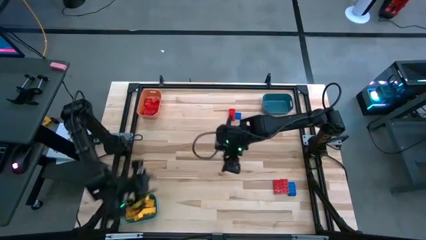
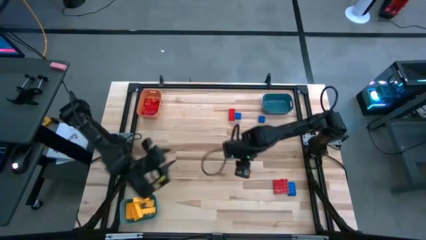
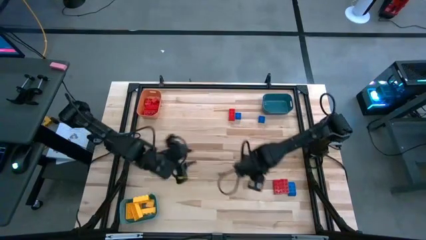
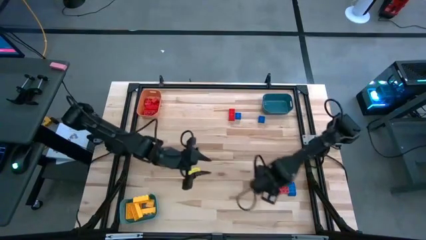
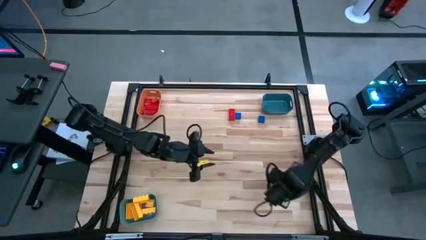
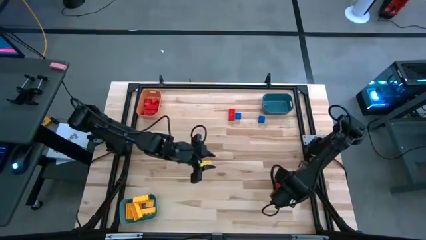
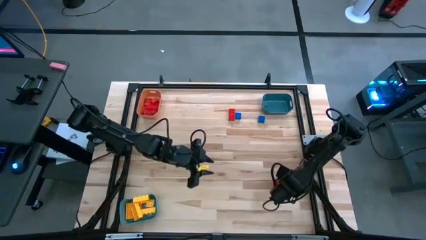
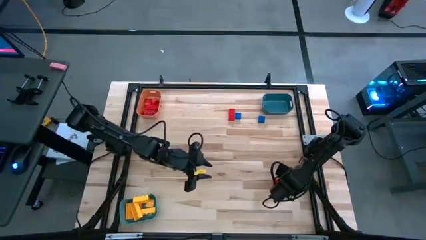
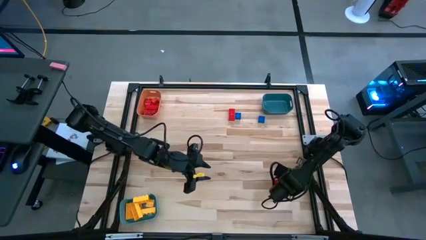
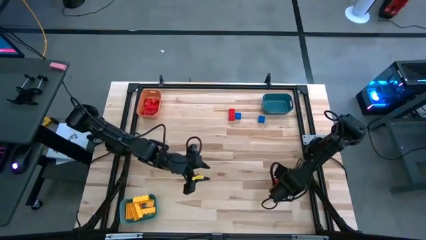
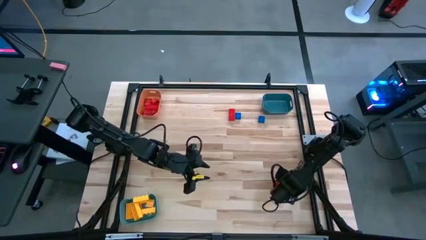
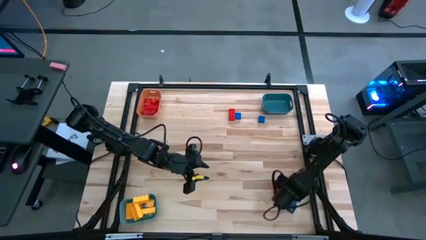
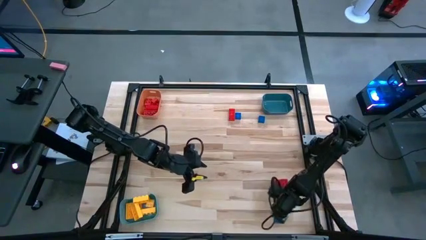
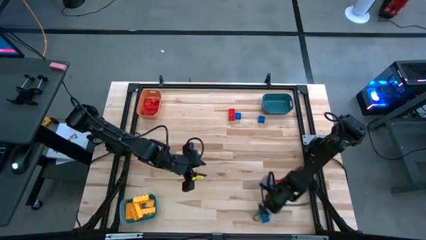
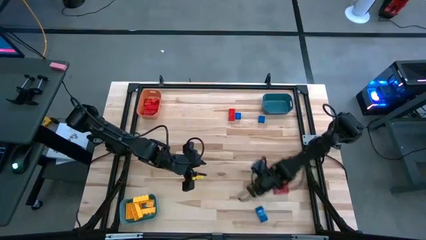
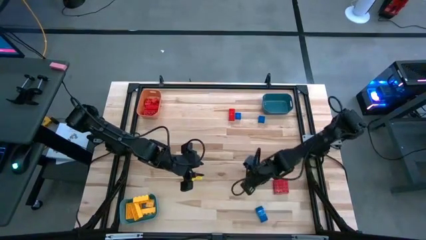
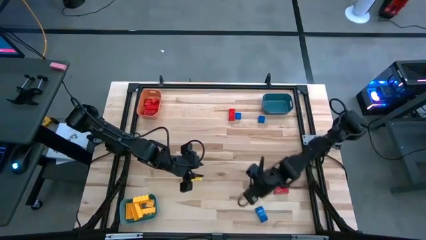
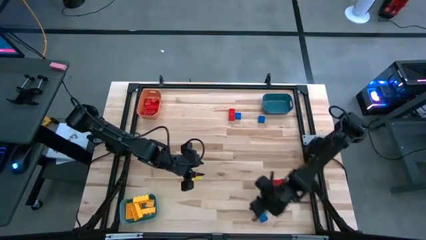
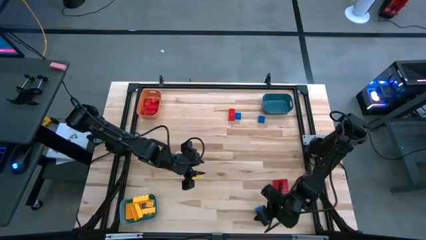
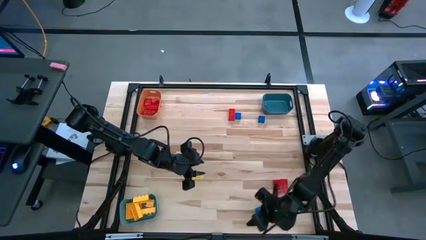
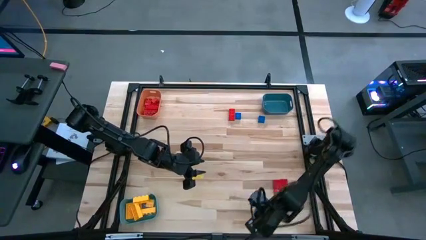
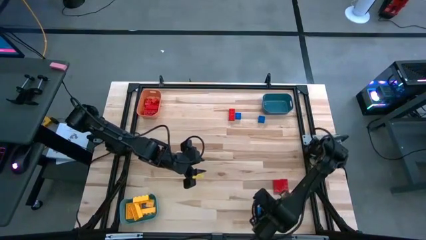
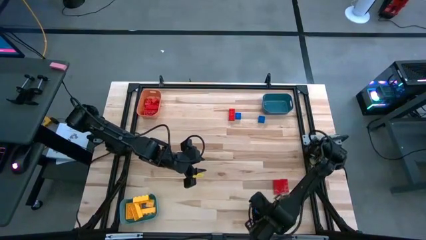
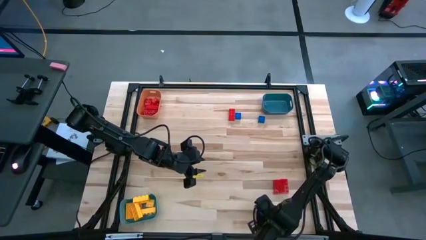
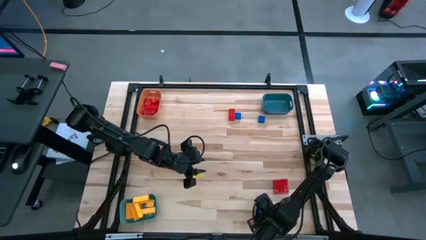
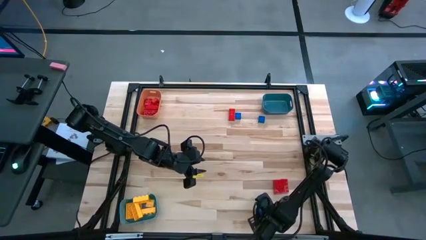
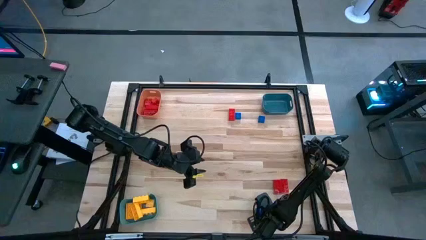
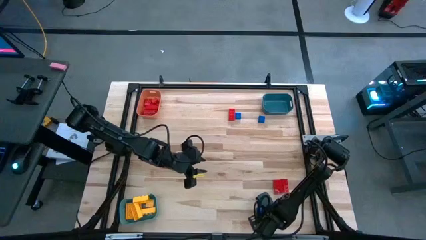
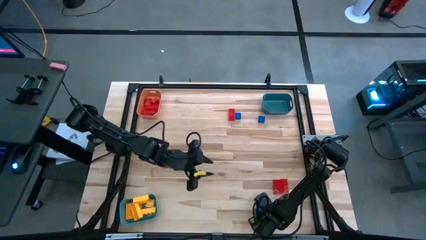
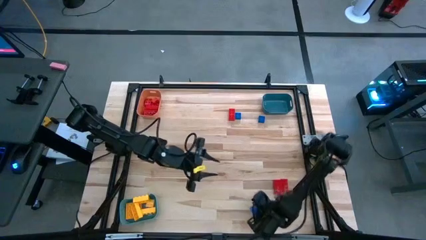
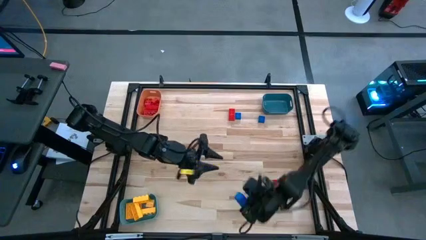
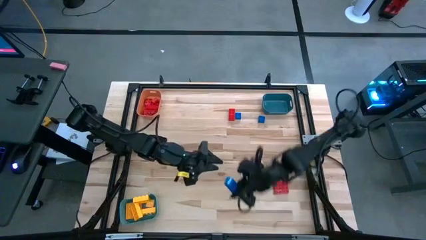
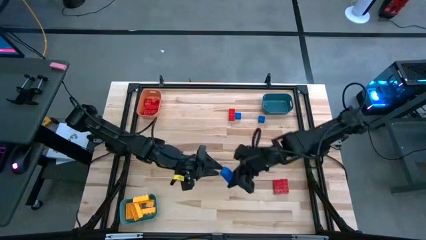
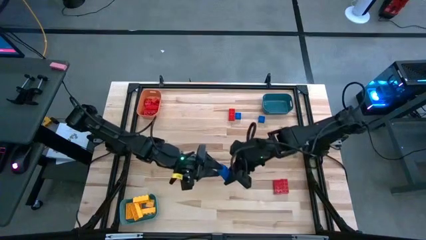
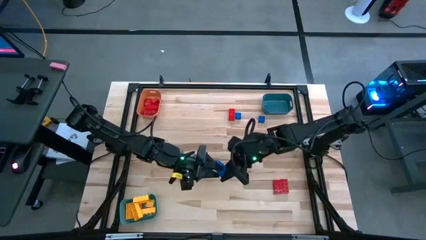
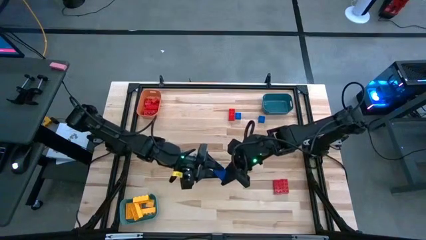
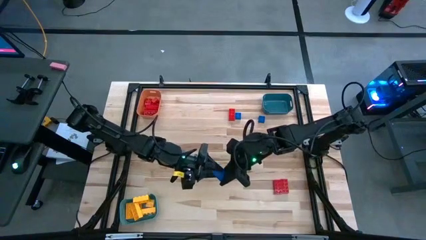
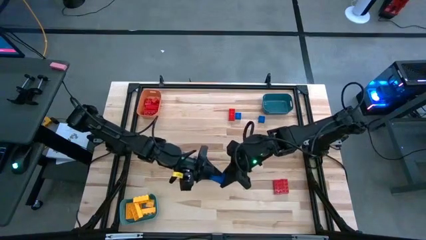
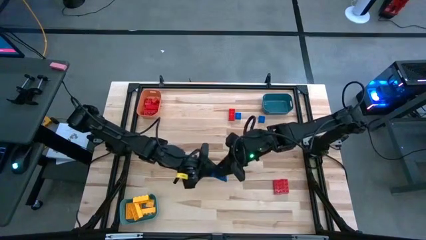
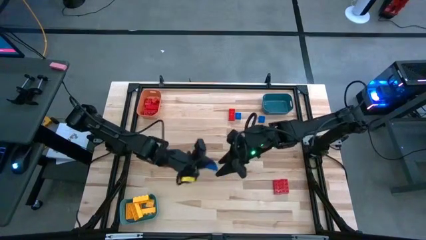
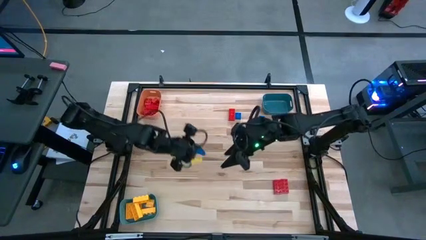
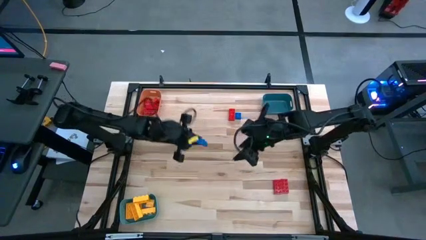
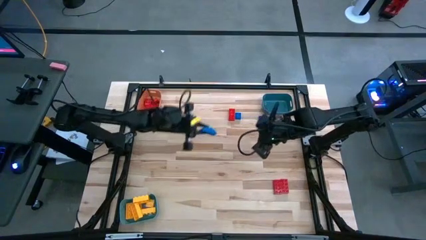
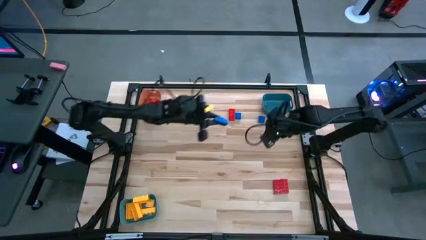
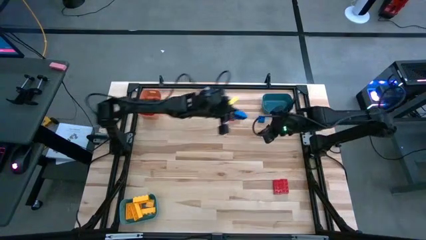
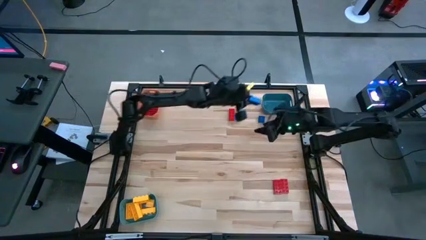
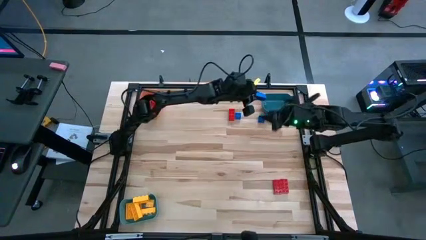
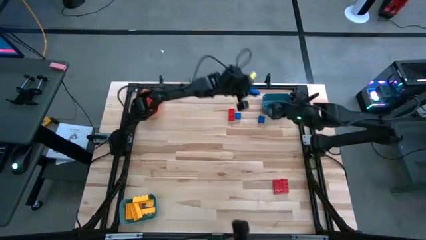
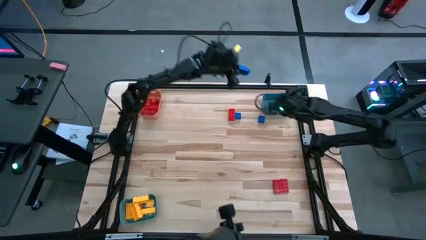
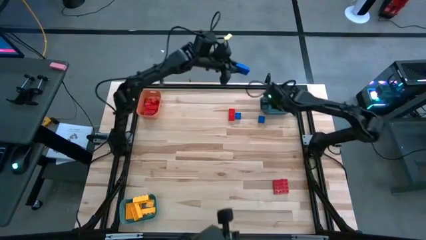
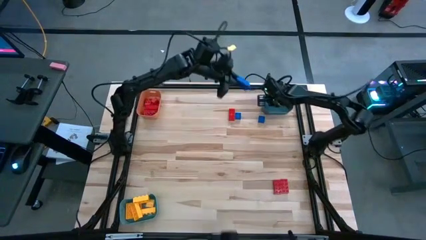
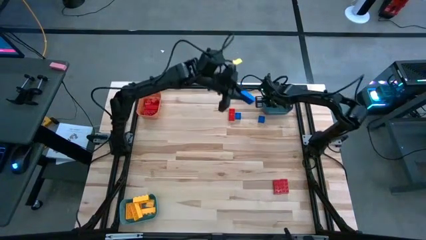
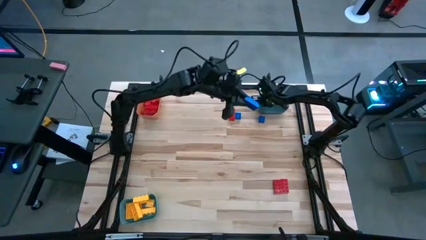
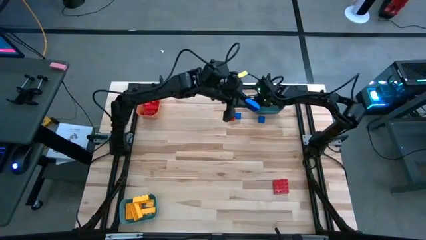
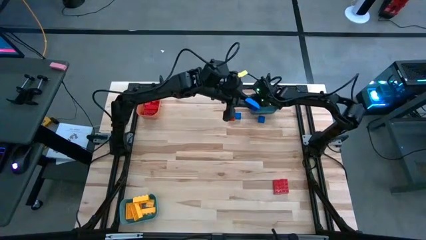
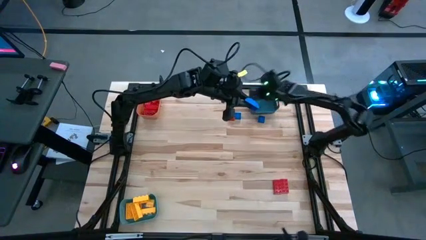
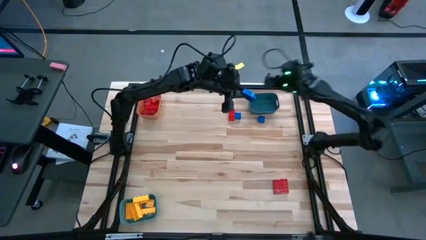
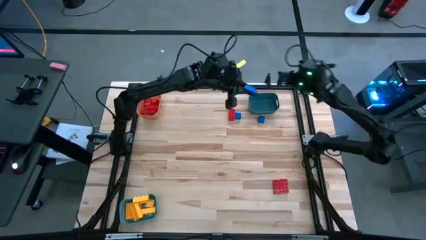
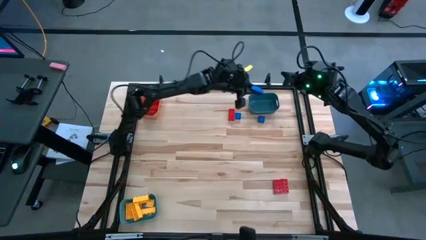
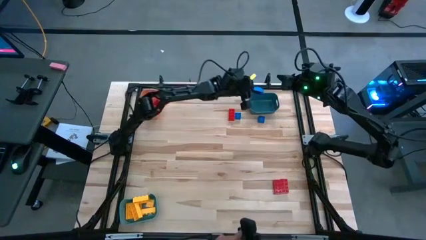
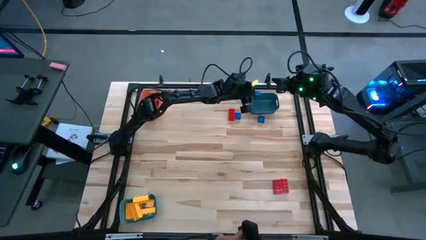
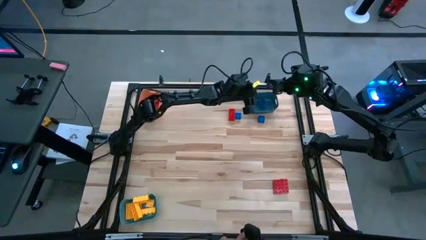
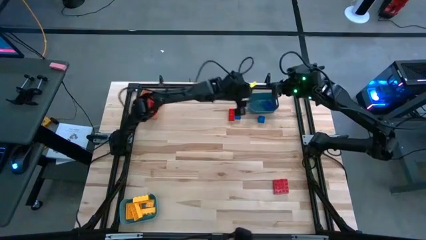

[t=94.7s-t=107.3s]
Task: Sort blocks
Put the blue game piece into the blue bin

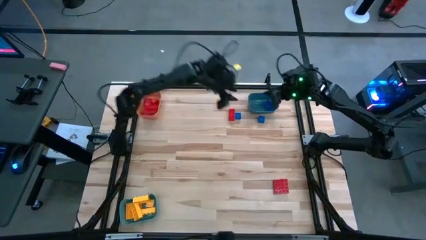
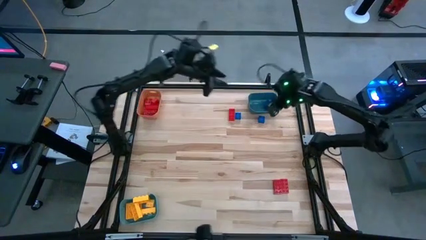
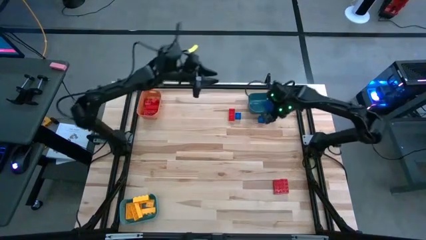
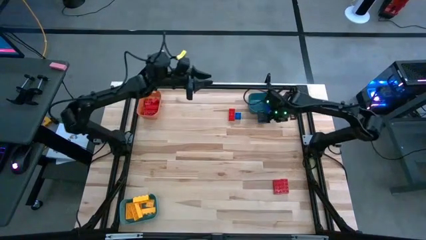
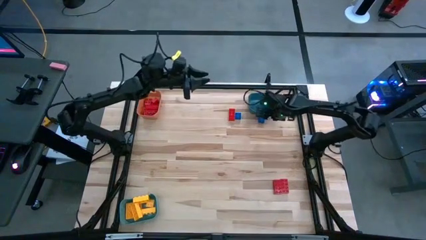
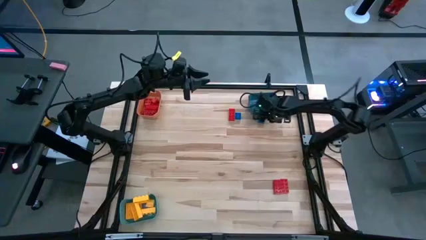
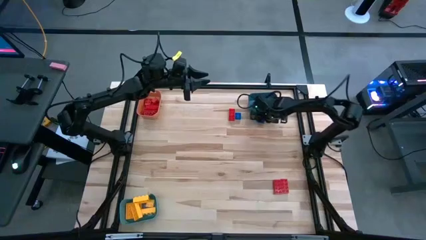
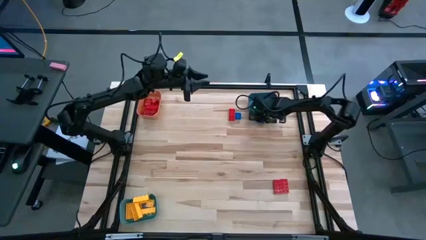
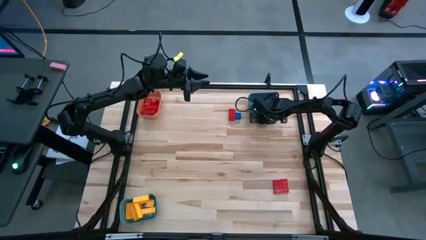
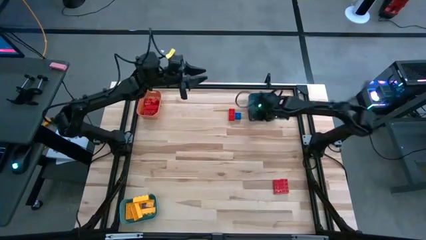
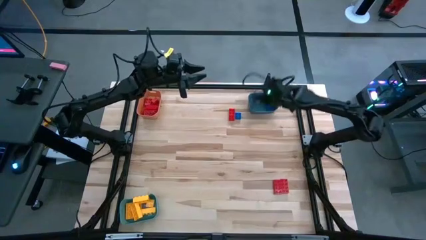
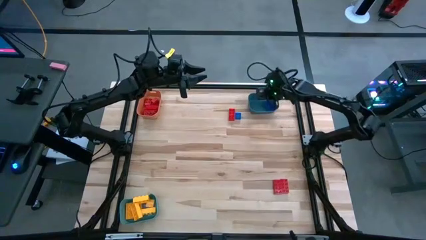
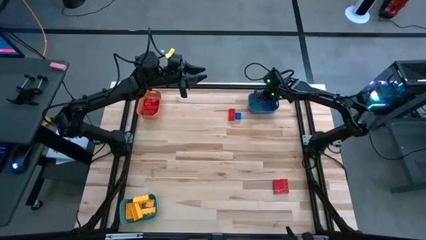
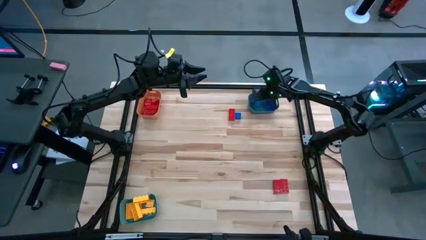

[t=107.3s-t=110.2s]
Put the blue game piece into the blue bin

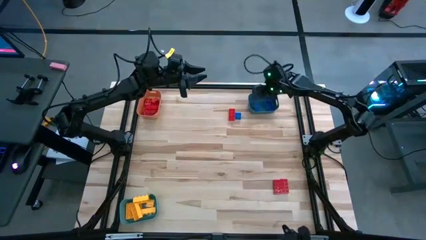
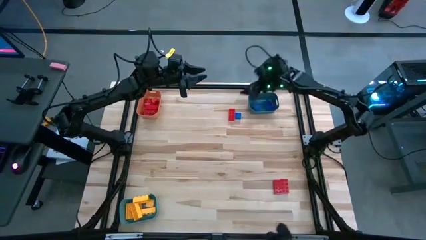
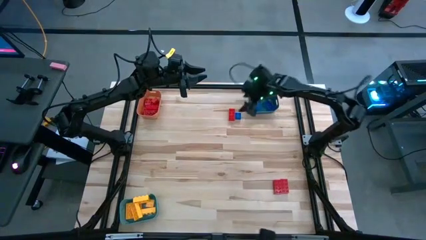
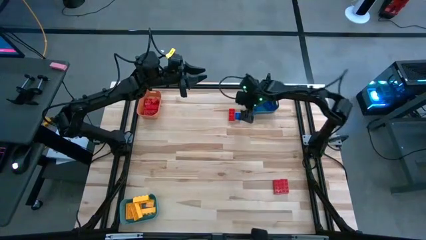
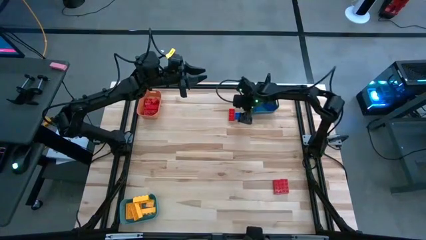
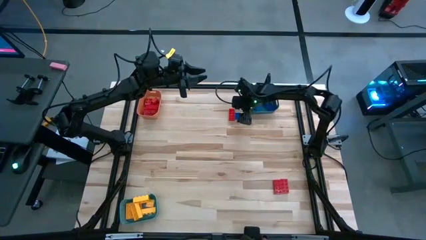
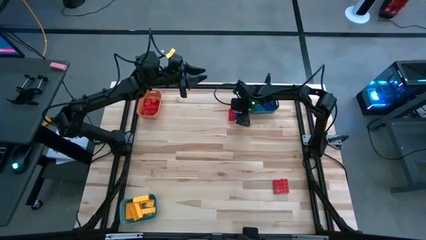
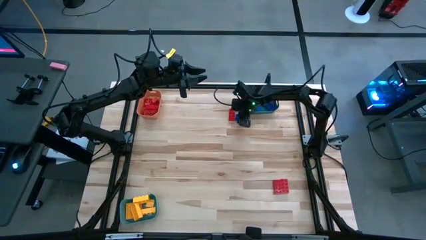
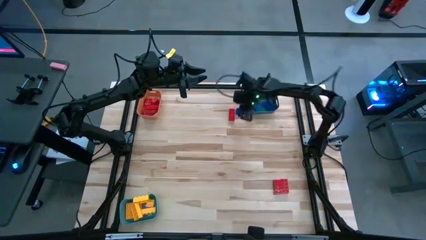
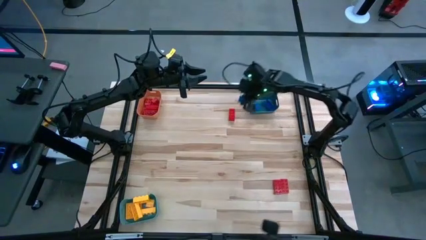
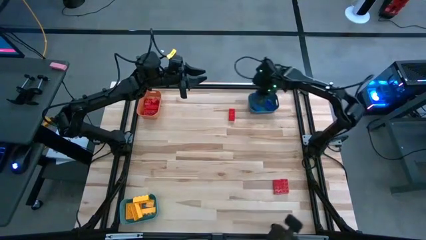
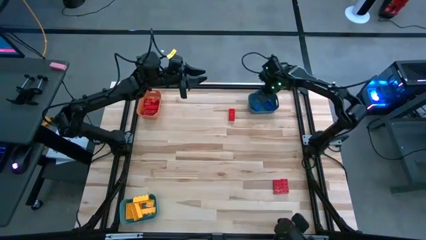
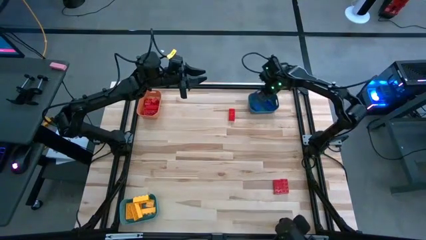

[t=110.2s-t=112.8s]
Put the blue game piece into the blue bin
